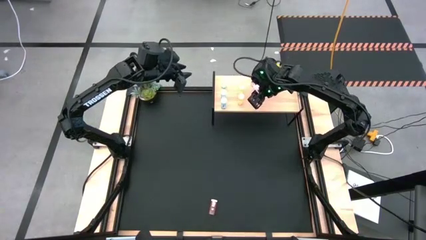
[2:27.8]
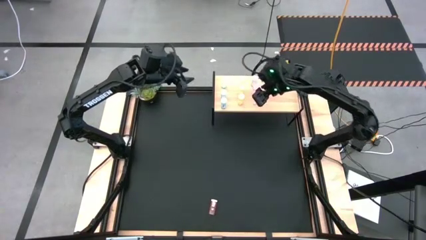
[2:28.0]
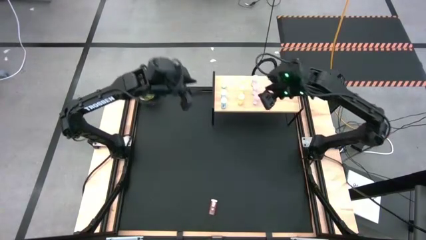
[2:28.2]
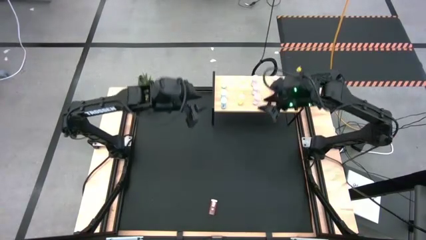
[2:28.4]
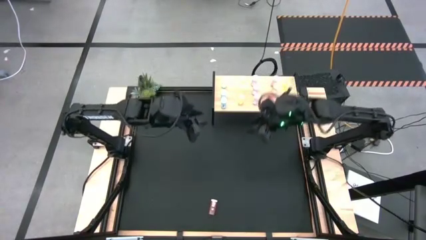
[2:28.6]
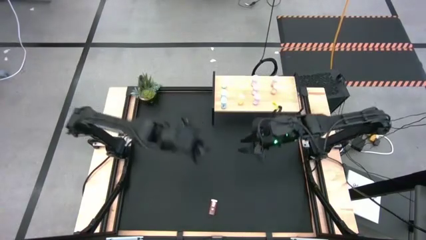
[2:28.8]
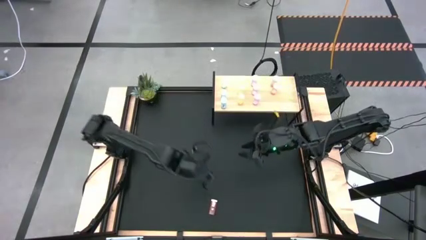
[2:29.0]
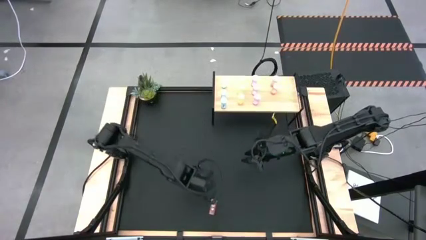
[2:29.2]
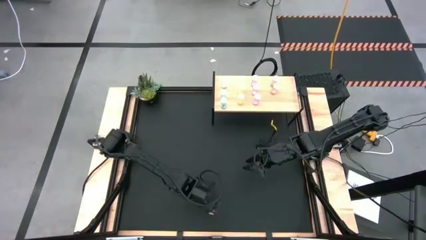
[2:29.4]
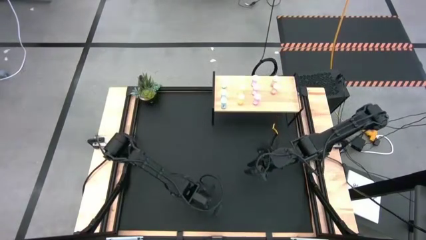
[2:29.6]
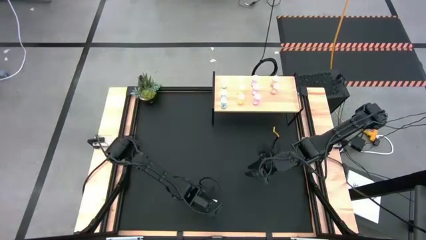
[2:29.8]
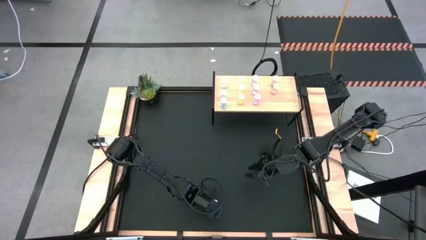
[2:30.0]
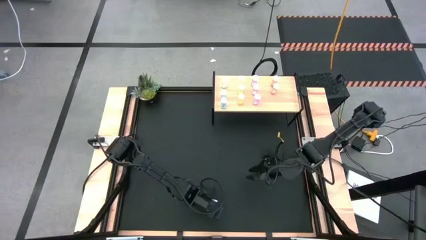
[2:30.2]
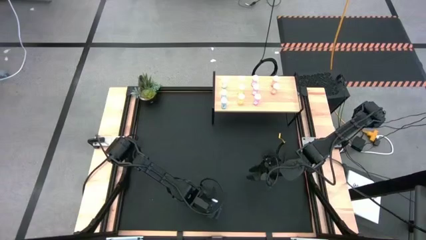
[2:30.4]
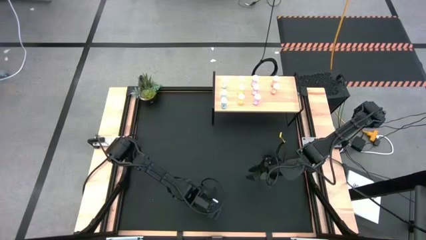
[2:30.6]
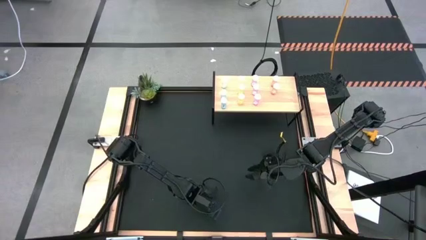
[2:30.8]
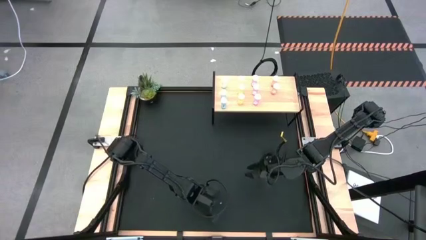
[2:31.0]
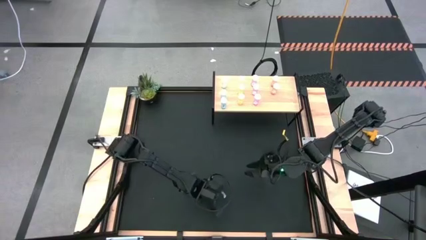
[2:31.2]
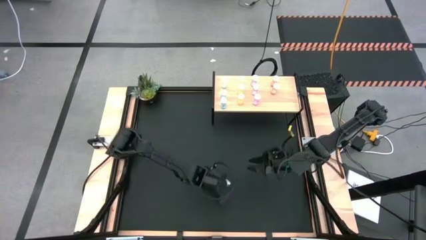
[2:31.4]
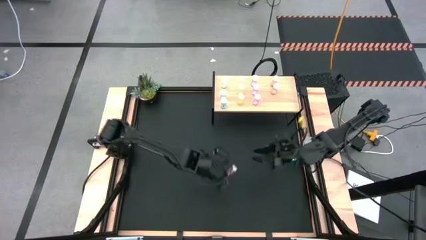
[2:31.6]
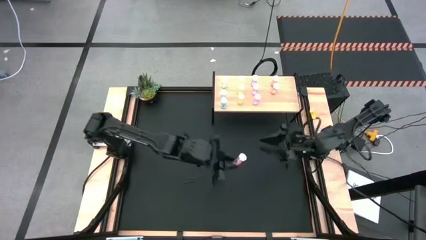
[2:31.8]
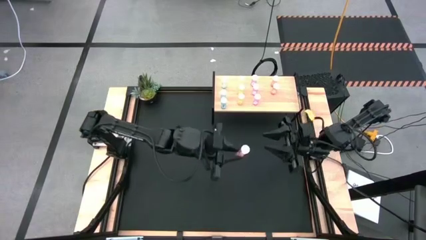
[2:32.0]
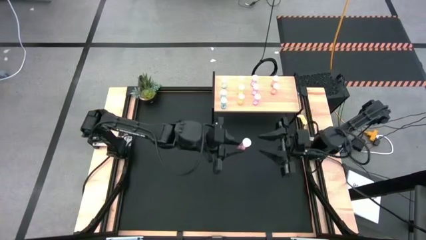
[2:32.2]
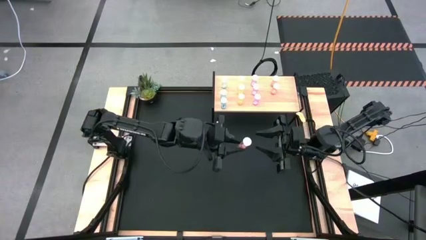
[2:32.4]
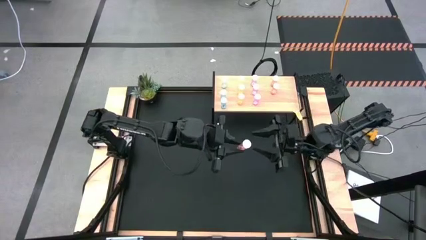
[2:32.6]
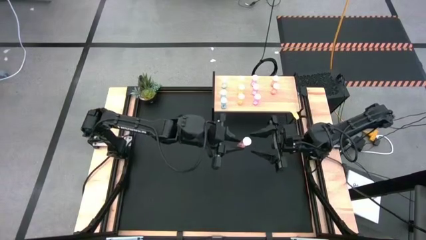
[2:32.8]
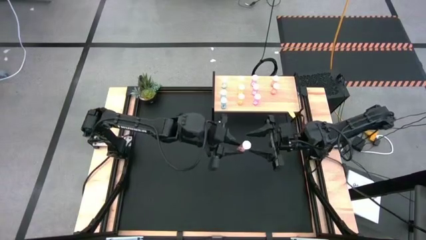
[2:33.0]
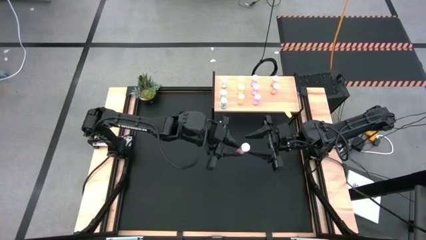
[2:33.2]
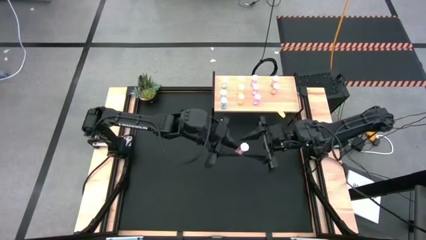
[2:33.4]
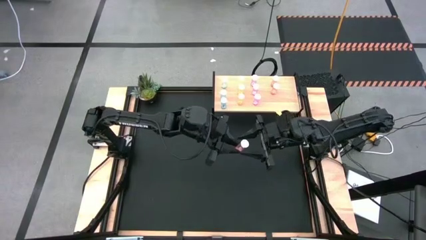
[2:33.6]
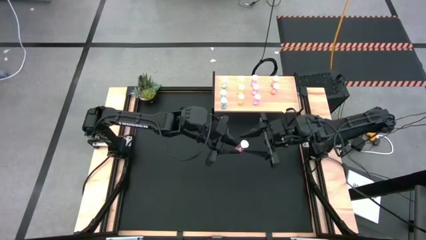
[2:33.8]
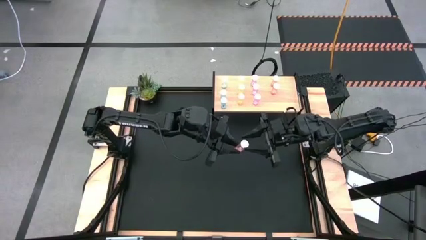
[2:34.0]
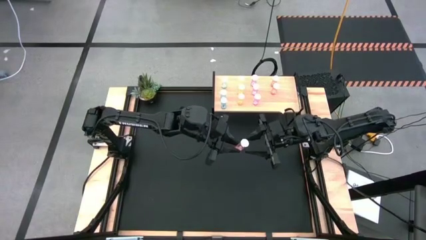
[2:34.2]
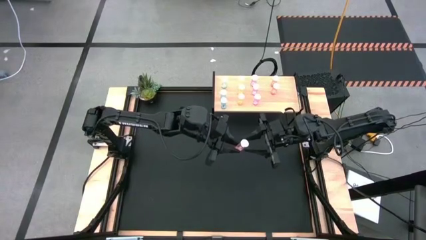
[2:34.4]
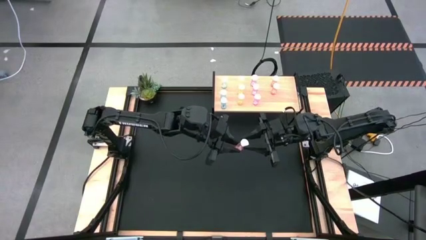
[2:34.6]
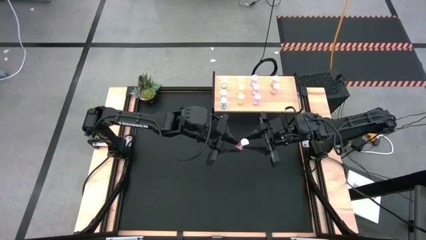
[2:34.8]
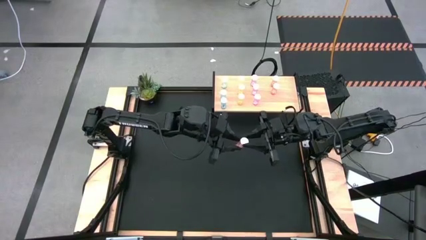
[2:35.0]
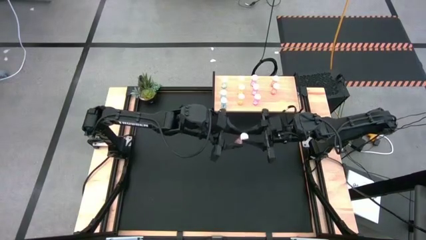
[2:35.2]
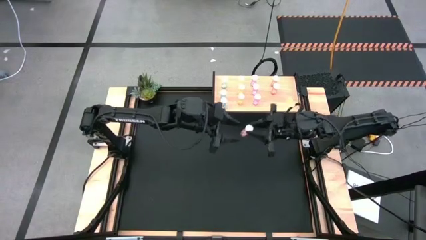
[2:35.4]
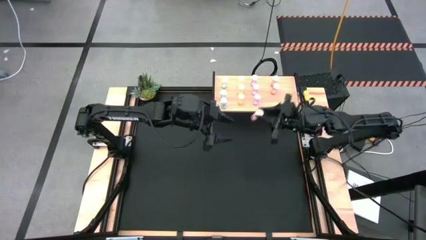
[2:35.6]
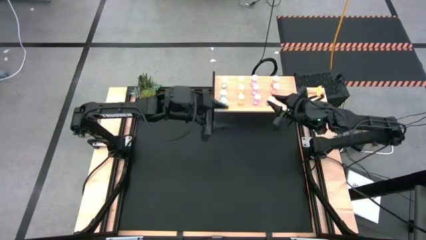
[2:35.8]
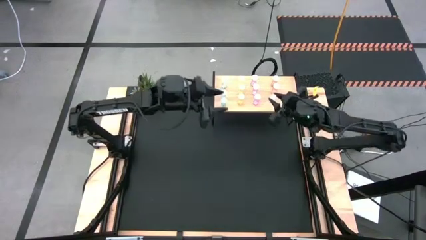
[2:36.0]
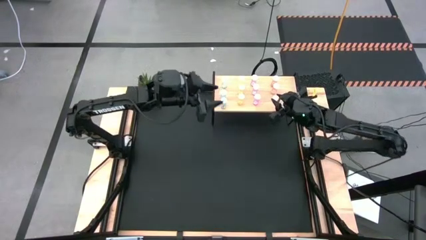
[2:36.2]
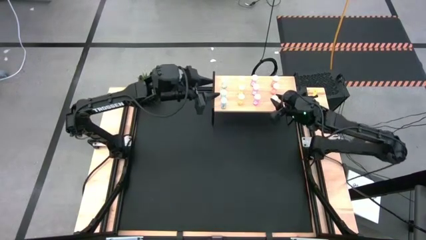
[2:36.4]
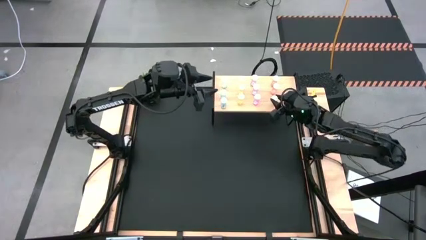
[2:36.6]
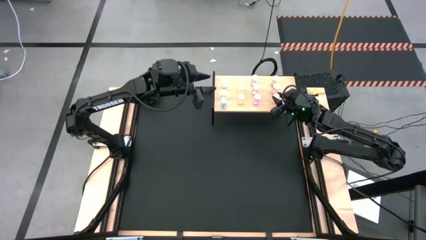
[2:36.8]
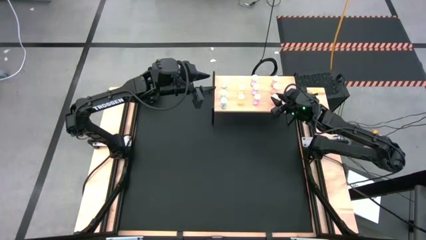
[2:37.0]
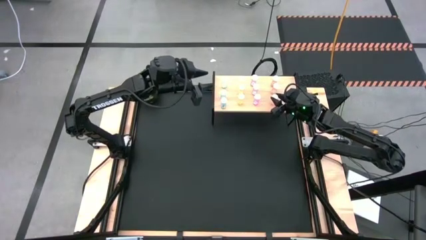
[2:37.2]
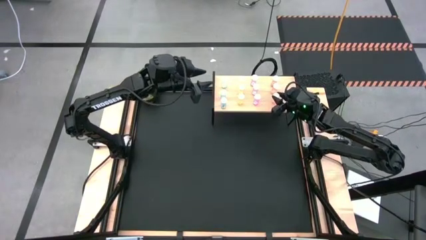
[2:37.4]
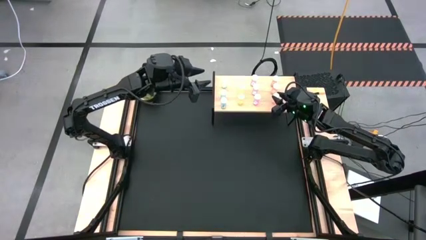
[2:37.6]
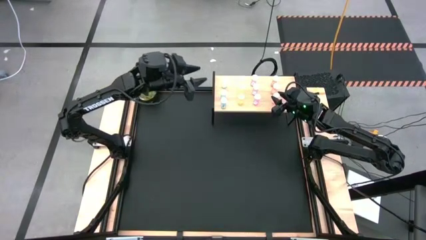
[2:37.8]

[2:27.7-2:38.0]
Task: Pick and place medicine bottles onto shelf by color
Put the orange pill bottle aligned with the other orange pill bottles on the shelf

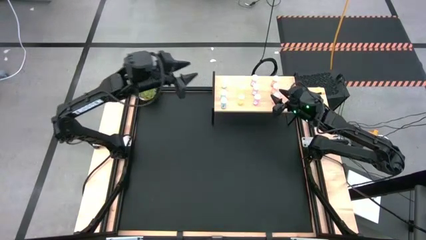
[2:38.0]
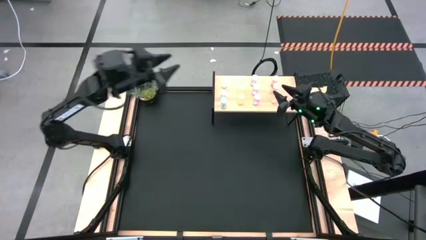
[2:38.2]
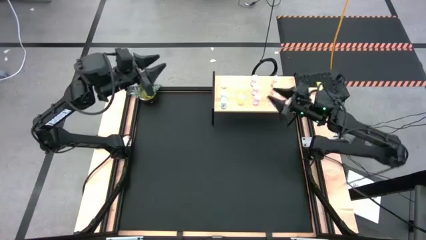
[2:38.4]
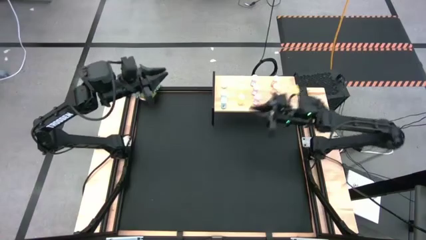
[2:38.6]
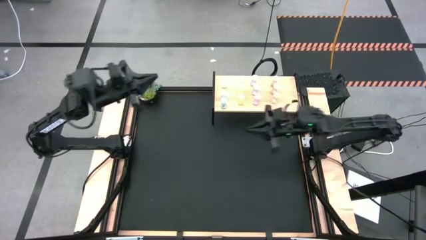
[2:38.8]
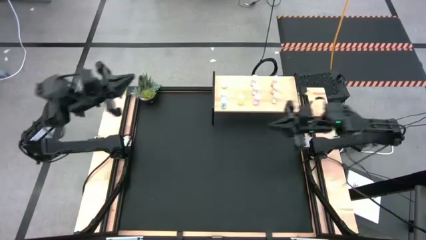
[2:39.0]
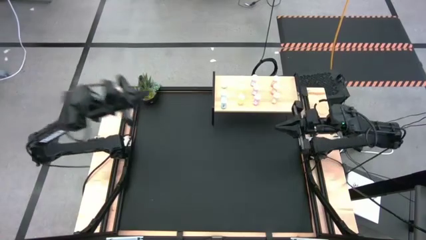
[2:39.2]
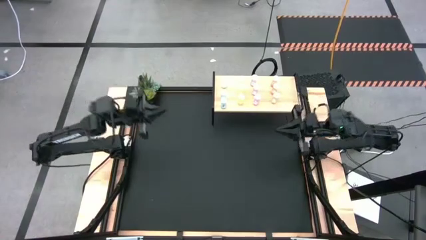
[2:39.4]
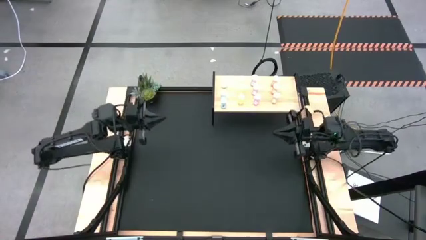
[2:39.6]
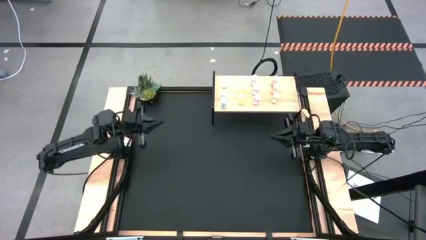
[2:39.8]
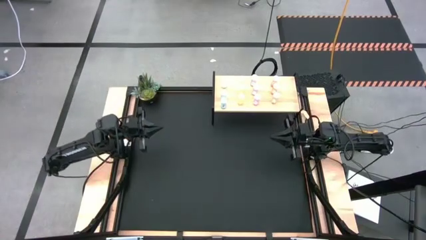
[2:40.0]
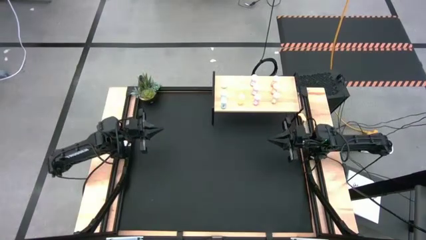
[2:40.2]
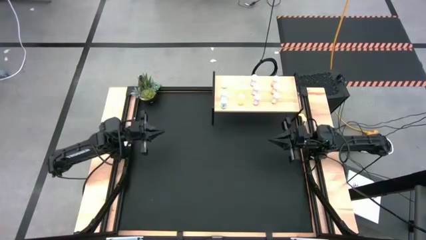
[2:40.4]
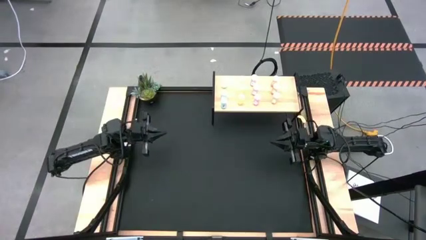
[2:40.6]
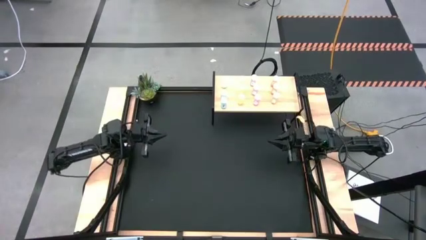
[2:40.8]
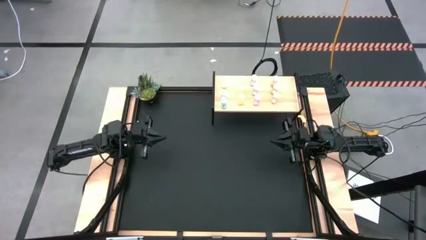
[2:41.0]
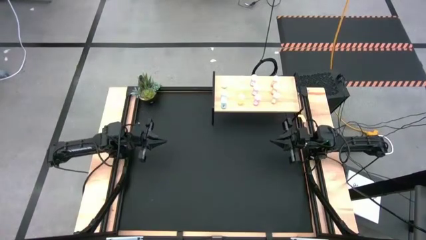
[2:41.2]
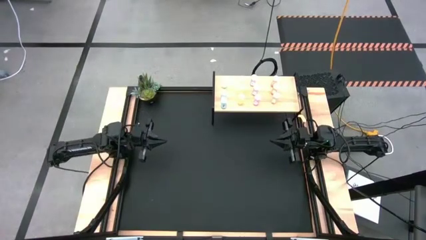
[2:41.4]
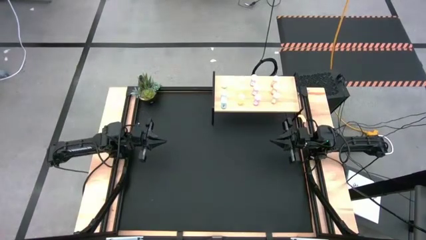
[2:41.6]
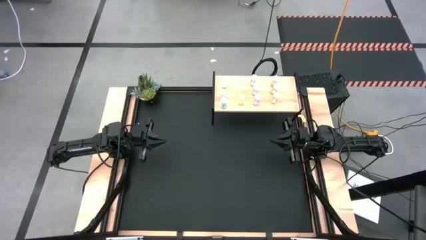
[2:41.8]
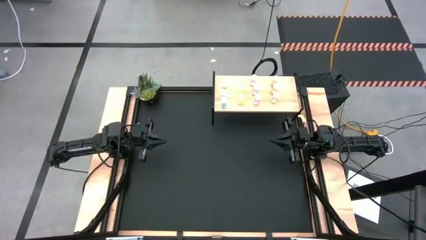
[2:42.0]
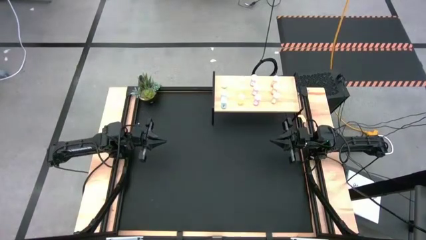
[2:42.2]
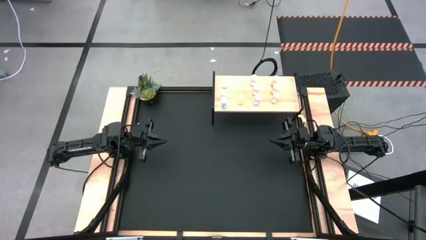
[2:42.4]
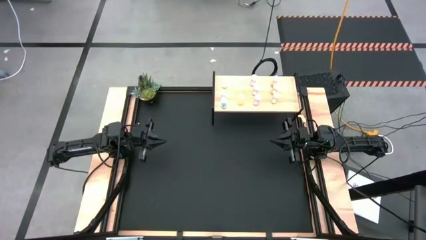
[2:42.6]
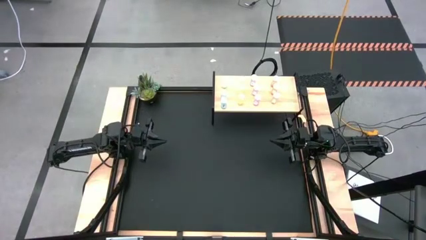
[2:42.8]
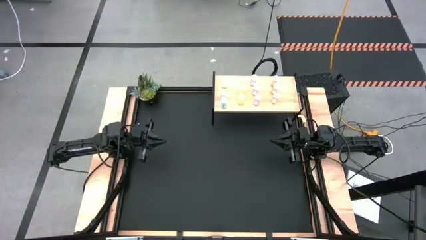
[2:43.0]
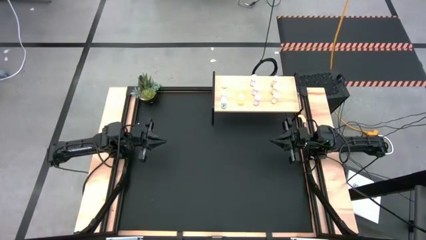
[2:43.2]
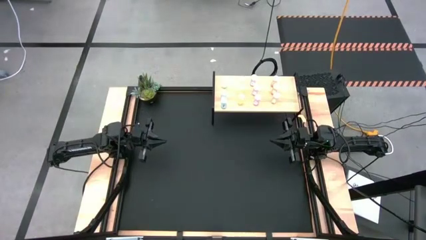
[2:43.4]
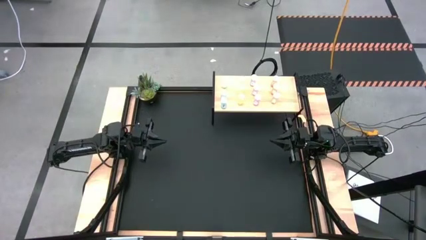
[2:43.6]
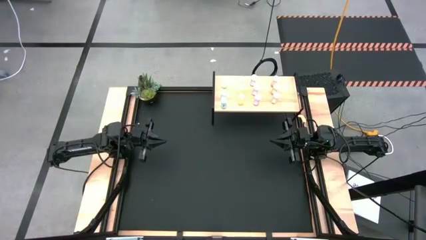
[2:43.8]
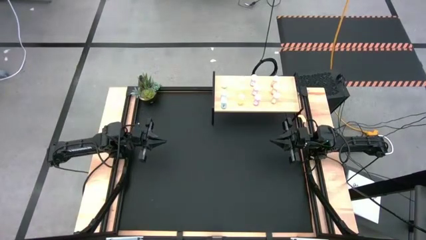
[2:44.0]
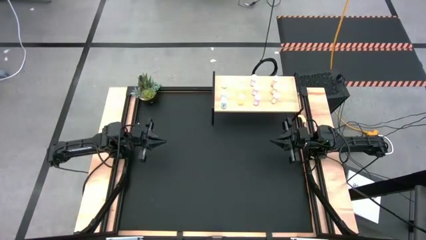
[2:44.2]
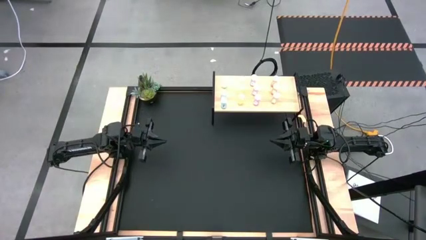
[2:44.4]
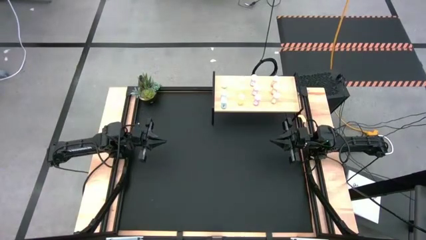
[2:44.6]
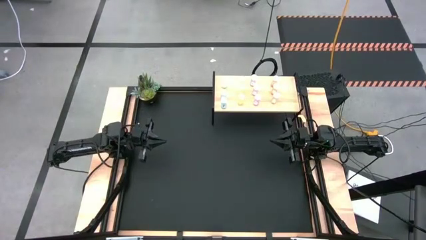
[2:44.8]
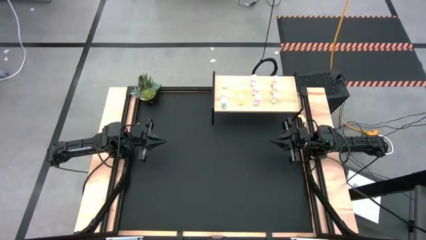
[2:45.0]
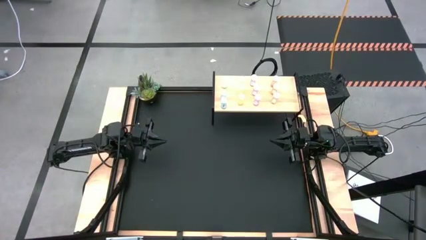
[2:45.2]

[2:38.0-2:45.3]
Return to Home Position
